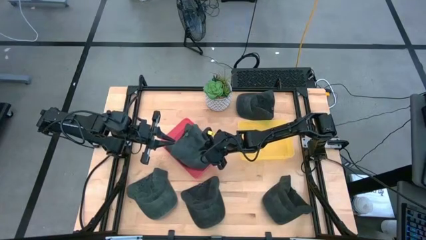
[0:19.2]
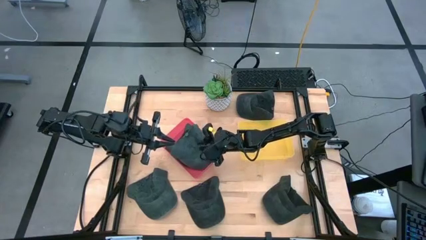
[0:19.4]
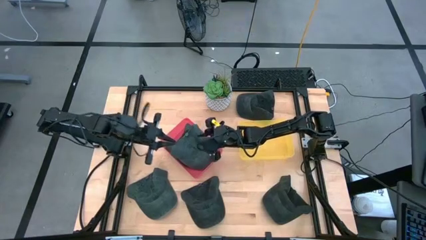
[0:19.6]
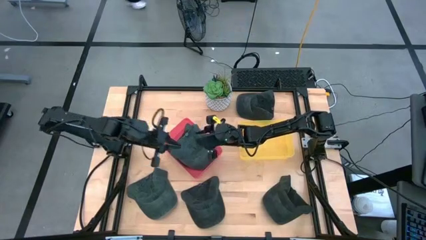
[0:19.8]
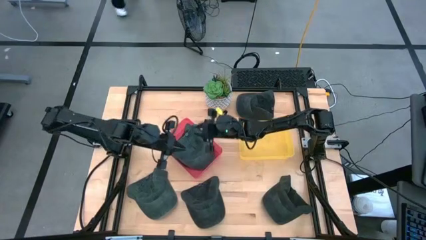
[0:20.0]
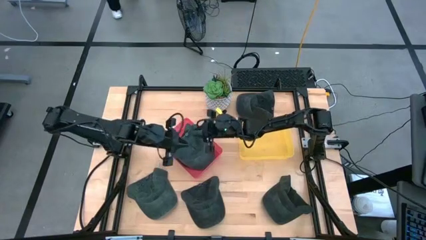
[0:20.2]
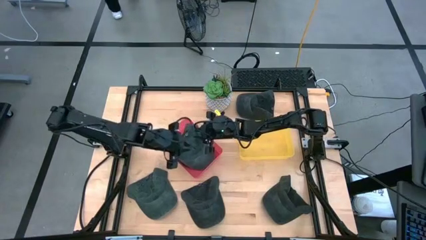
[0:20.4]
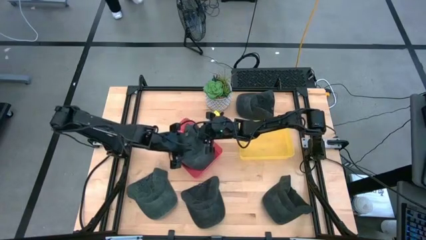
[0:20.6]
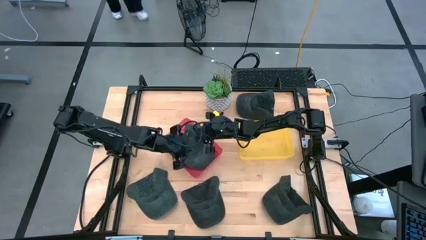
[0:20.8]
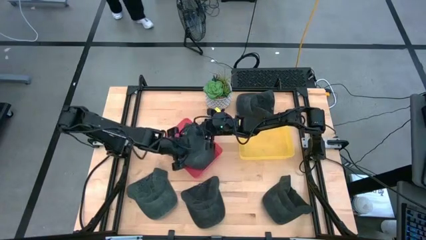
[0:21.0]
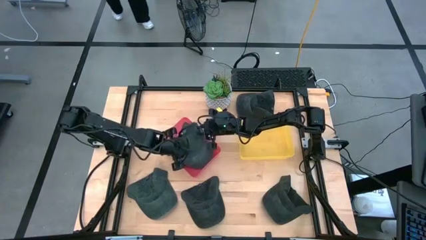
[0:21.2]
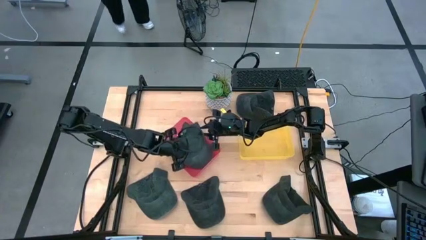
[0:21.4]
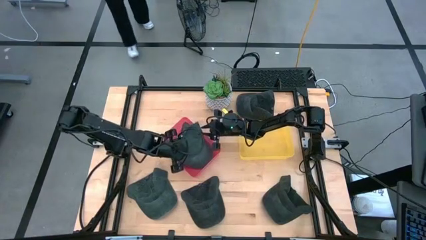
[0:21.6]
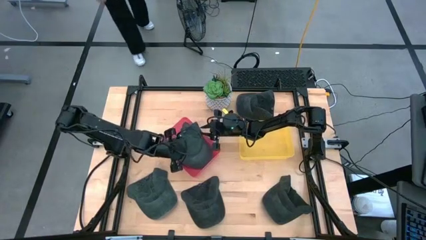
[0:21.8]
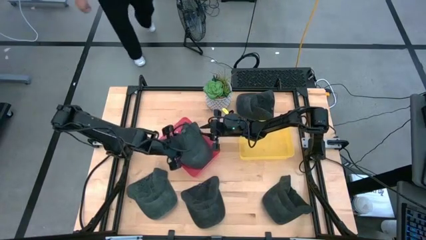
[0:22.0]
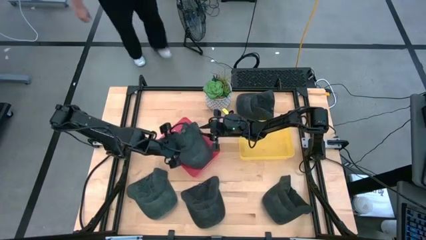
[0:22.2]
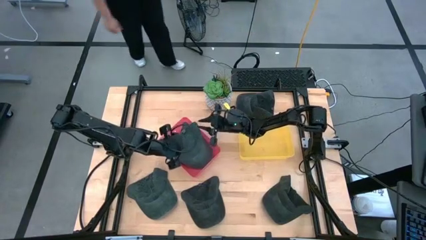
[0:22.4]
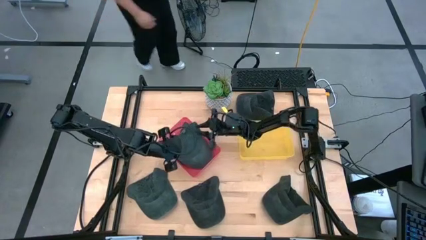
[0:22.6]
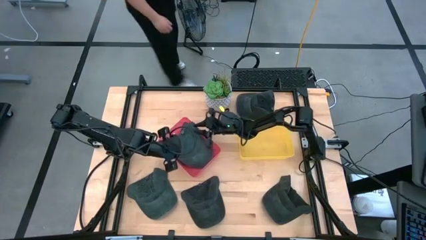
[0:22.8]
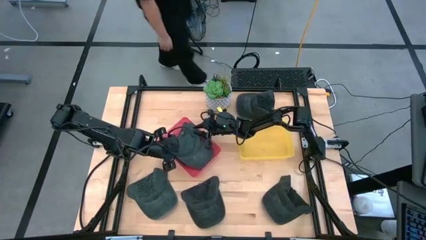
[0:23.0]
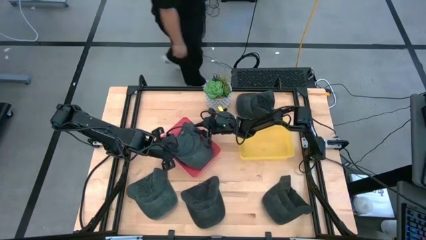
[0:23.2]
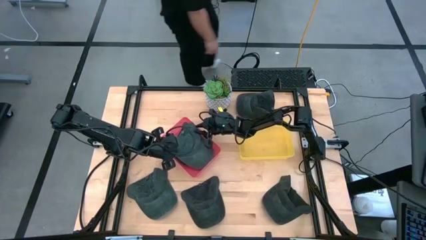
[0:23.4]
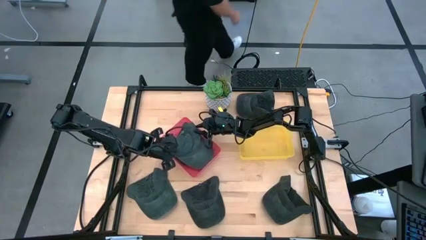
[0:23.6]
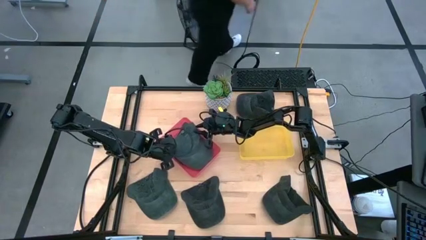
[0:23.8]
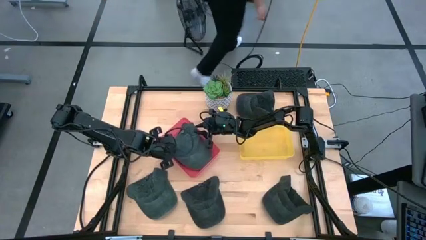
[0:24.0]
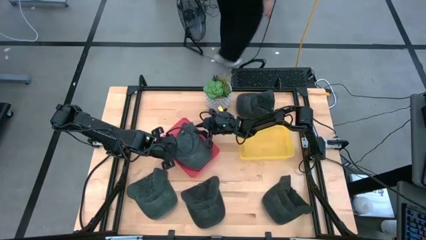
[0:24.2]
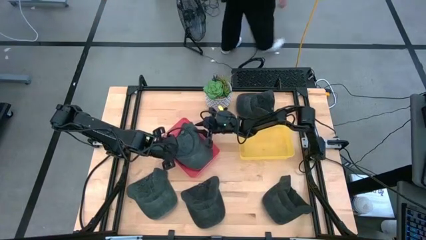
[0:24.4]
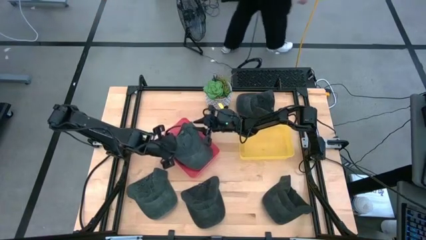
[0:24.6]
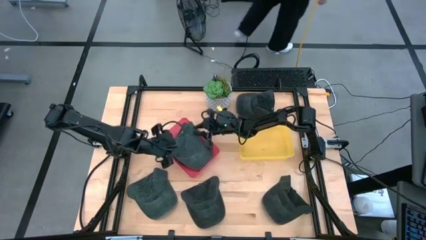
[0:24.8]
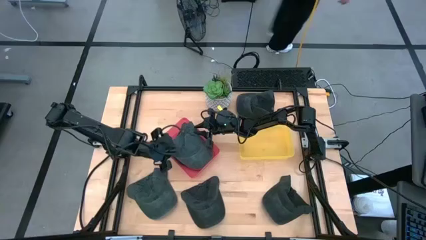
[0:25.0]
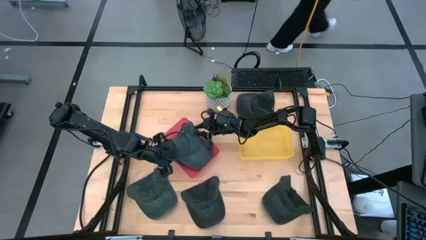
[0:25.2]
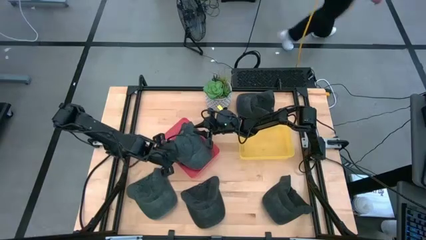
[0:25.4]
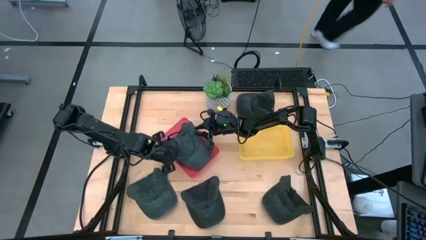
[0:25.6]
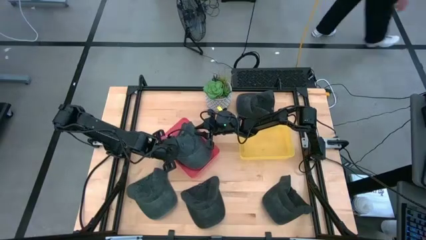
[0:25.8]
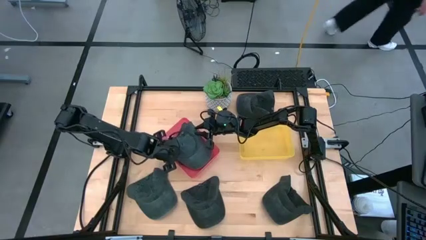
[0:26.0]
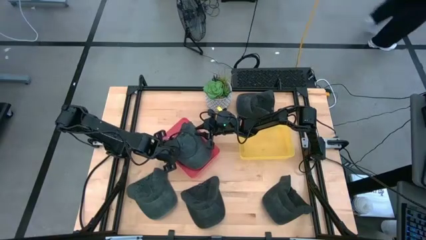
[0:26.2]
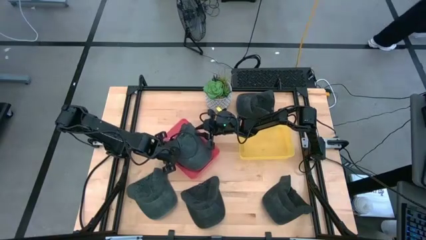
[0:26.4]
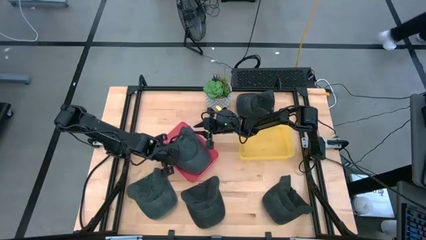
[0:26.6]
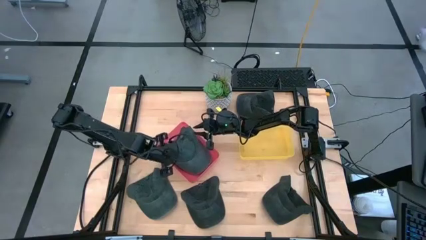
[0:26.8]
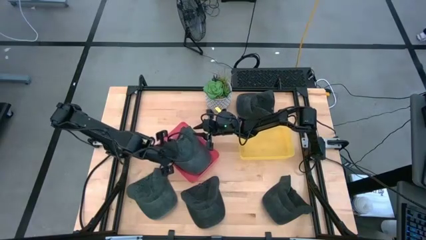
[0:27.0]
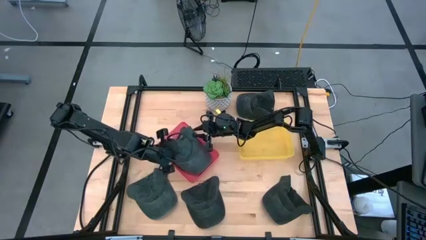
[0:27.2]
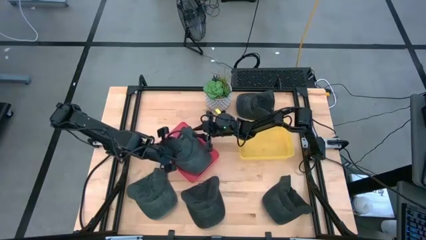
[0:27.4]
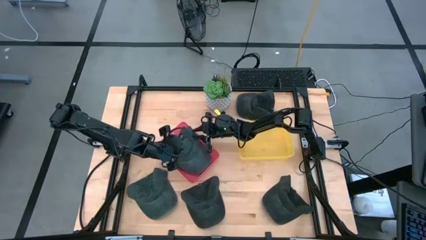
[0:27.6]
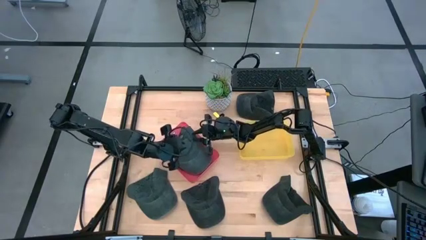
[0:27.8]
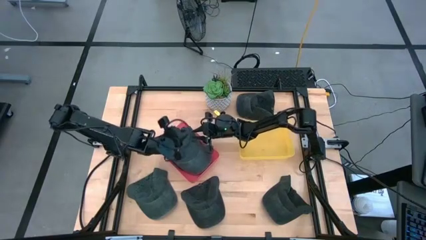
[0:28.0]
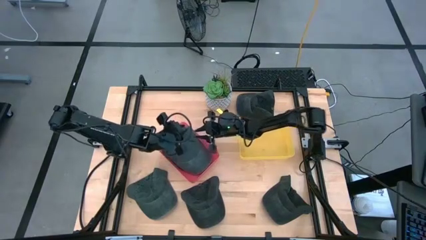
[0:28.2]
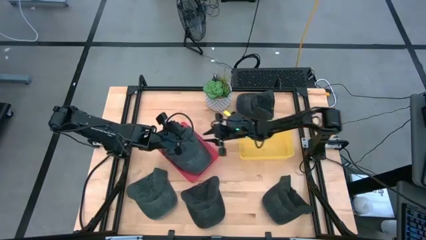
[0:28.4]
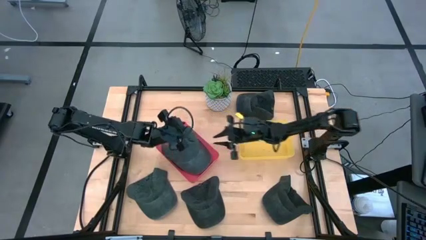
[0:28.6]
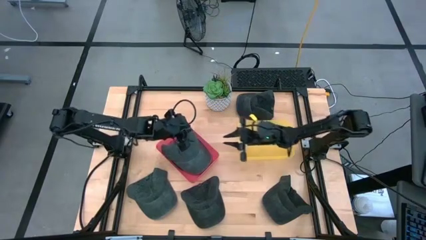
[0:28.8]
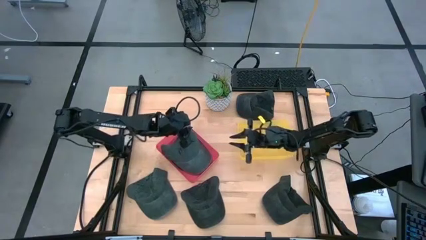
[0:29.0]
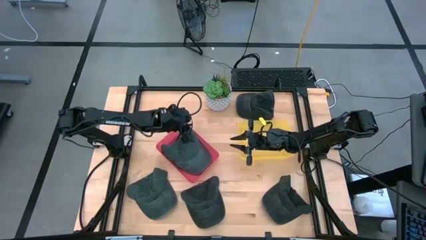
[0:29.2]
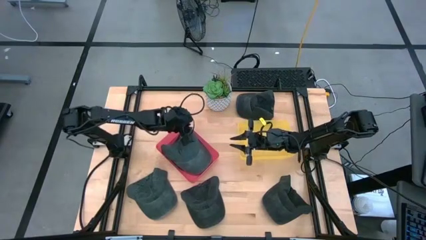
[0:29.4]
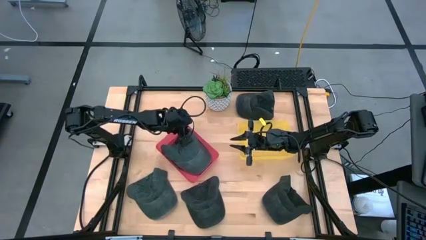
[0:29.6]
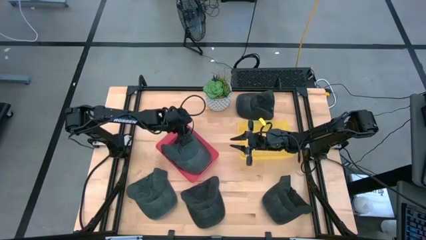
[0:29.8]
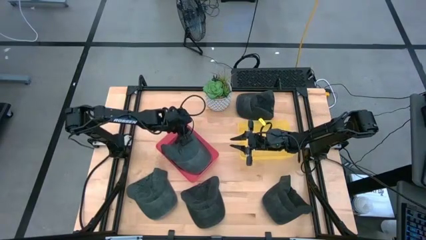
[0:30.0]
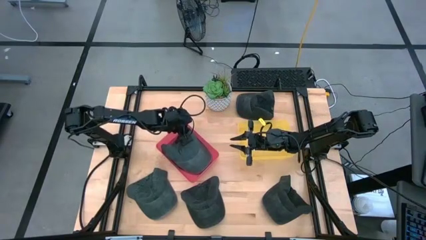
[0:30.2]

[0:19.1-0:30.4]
Task: Pick & Place hat
Adjust the right dark gray cap in the red bin

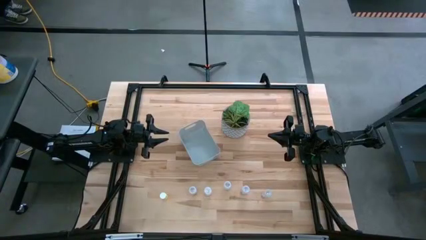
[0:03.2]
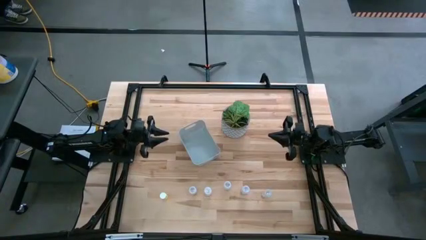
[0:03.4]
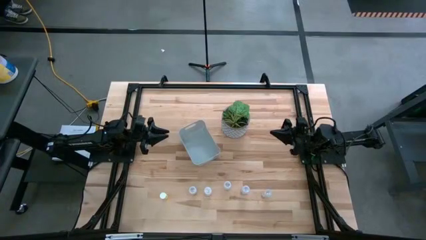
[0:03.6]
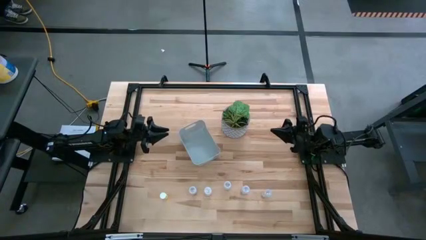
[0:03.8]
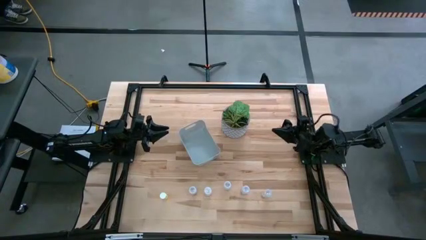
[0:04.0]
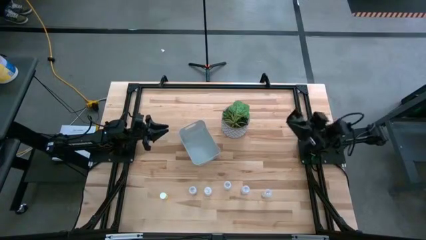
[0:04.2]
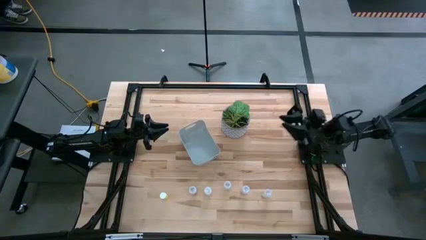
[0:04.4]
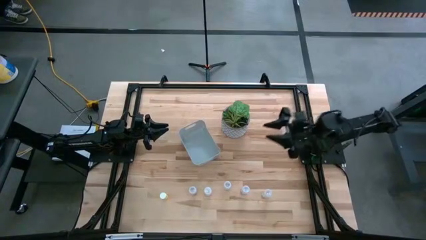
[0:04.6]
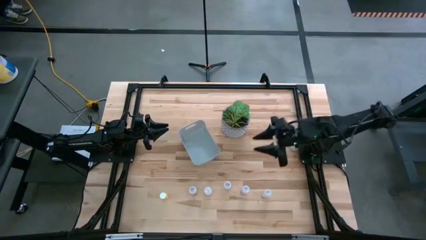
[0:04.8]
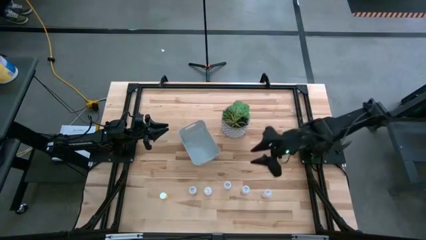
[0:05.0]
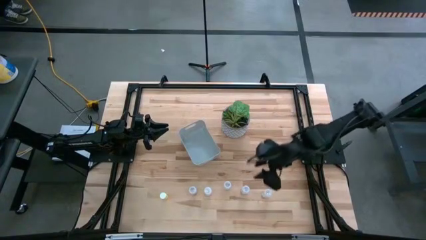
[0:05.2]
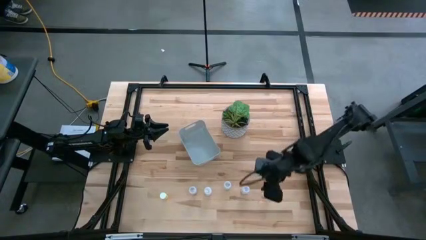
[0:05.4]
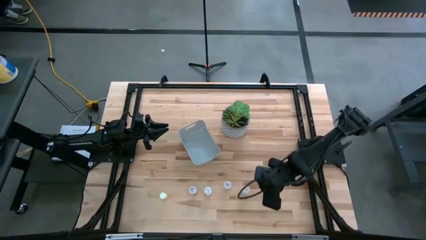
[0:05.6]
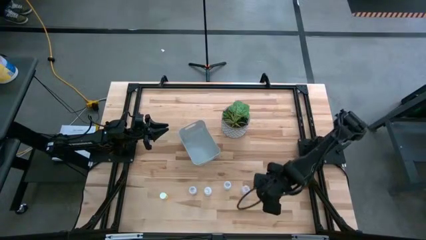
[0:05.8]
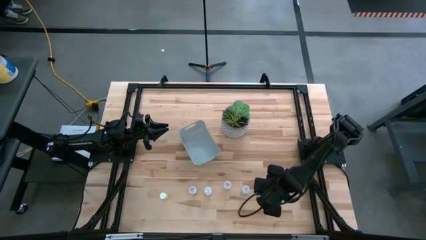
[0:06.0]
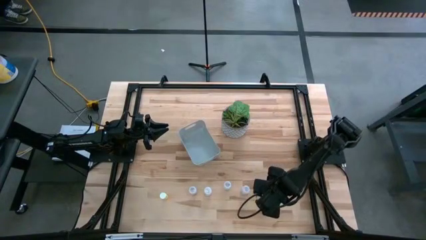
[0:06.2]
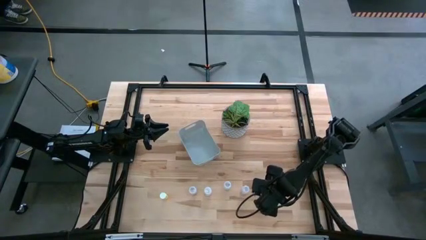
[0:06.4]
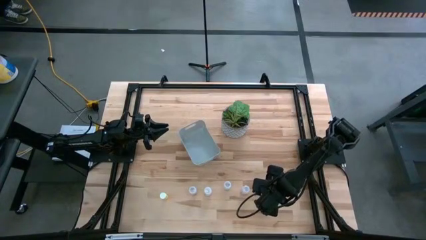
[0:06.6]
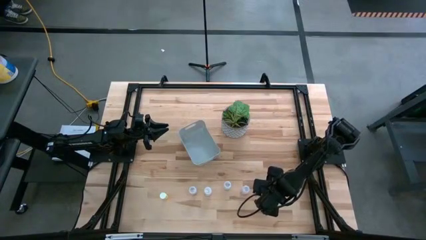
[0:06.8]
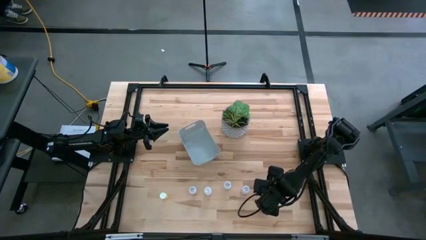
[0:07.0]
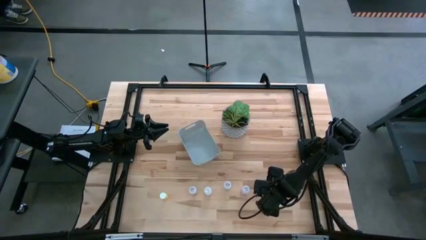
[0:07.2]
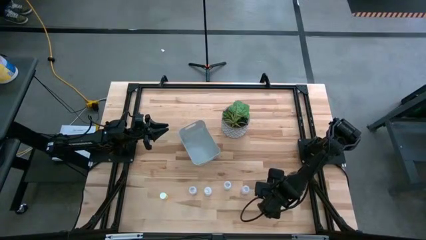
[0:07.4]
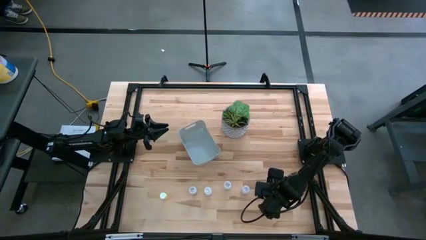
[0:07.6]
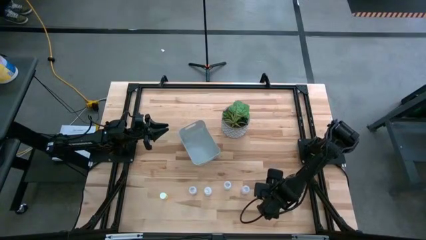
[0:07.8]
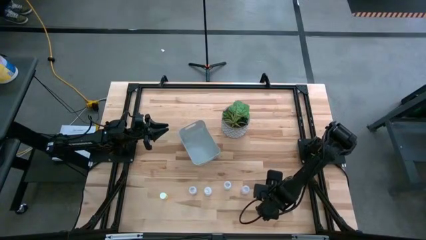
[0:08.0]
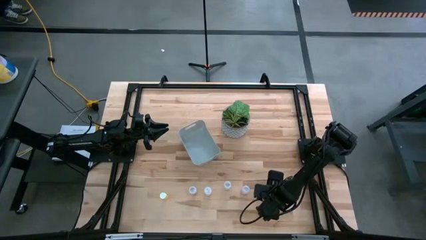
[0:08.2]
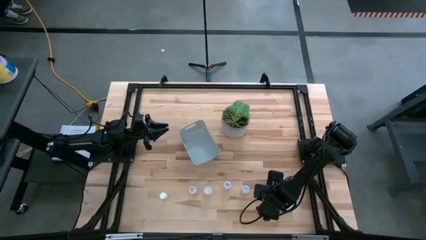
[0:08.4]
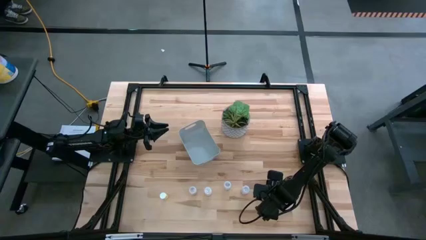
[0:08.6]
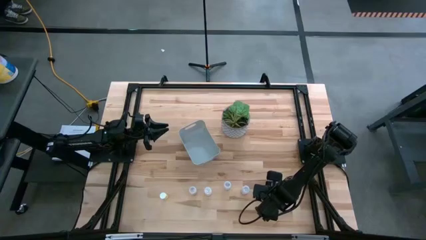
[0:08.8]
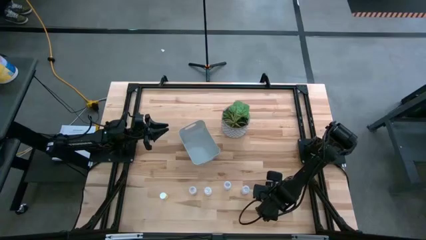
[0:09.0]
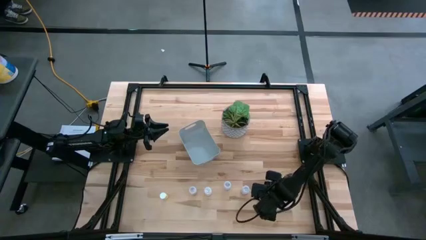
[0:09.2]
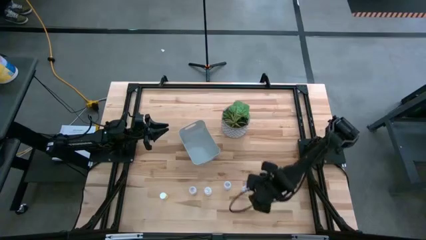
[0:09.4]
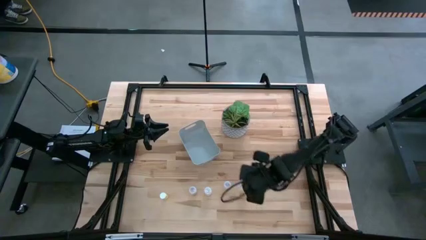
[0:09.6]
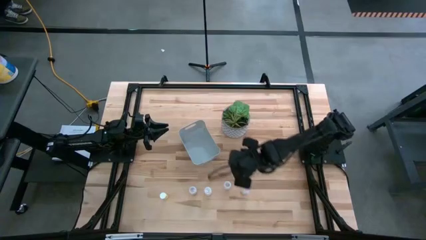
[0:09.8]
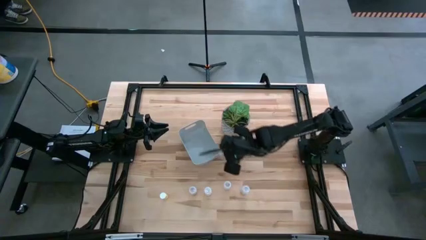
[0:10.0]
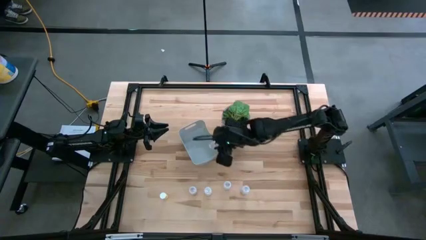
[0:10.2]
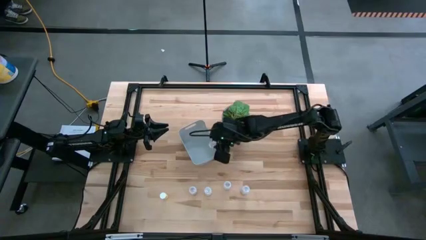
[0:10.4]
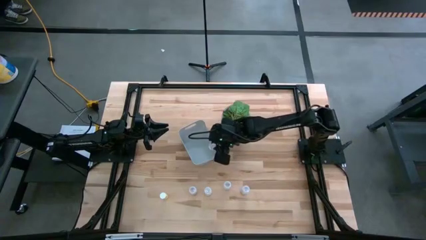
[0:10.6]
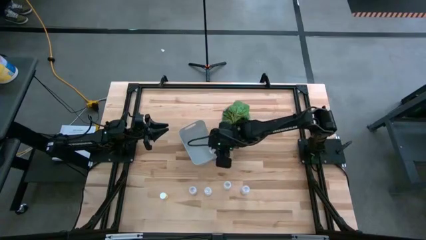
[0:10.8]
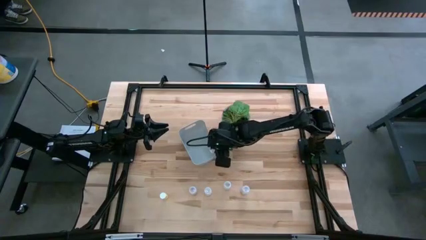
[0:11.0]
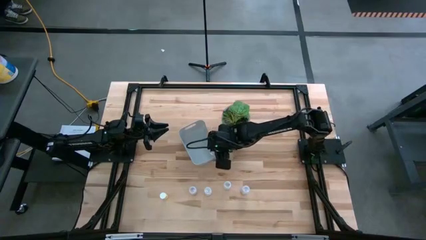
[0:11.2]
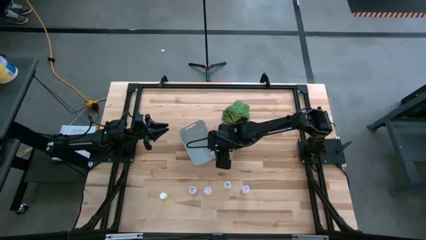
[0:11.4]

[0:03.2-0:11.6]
Task: Pick and place pill bottles into a basket
Put the transparent pill bottle into the white bin
